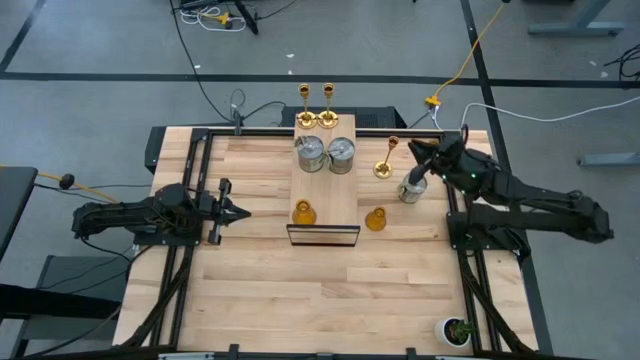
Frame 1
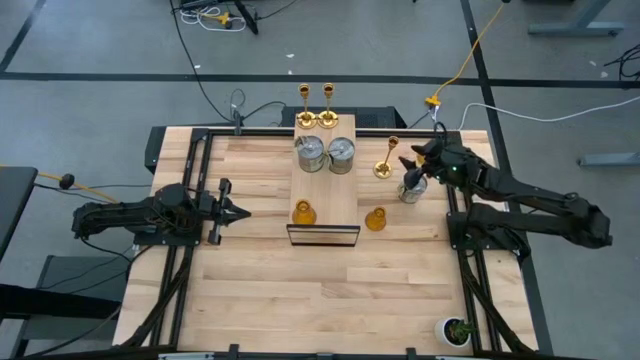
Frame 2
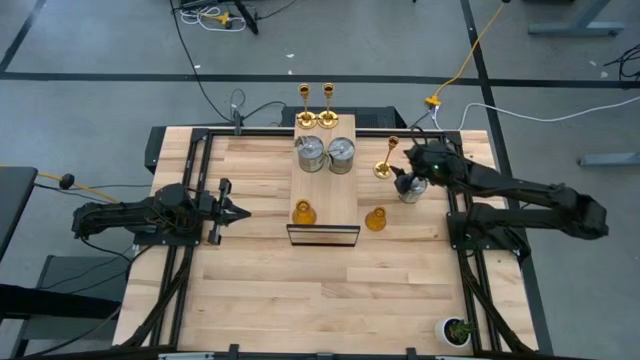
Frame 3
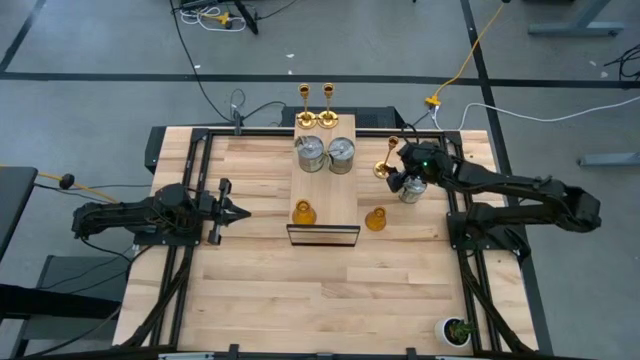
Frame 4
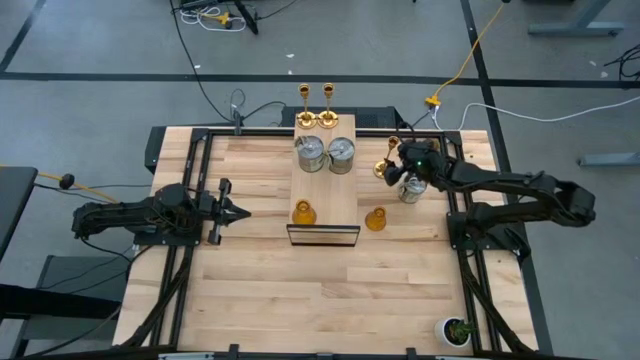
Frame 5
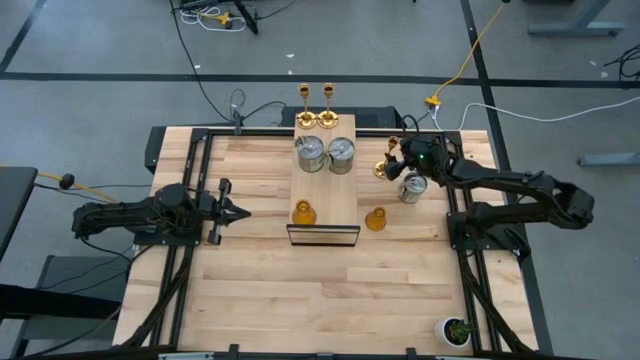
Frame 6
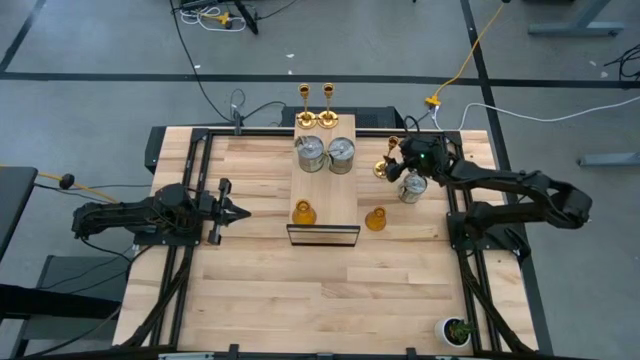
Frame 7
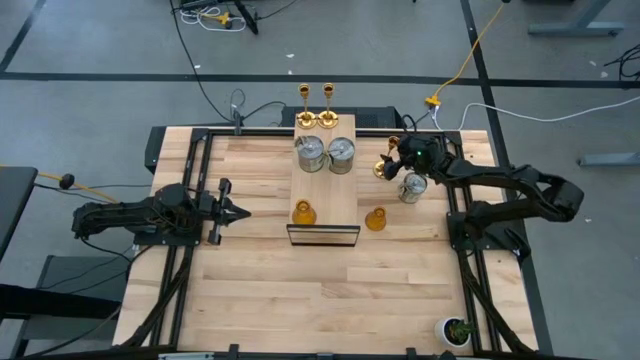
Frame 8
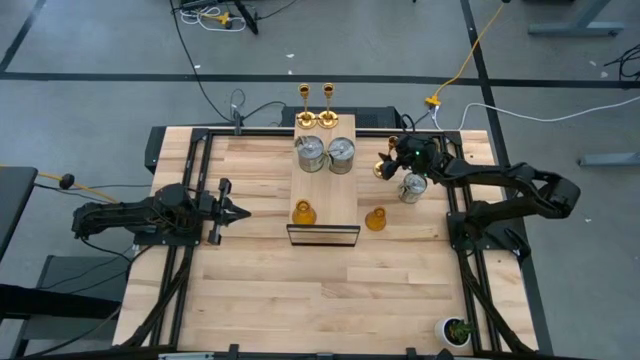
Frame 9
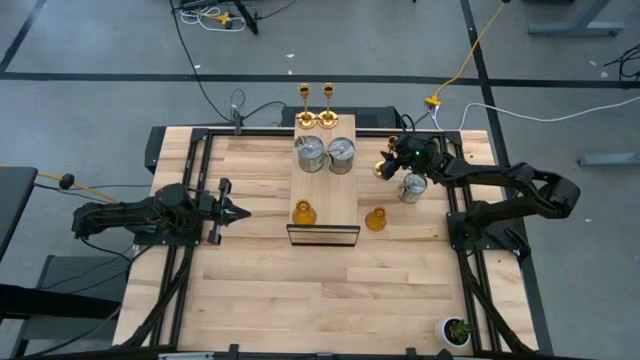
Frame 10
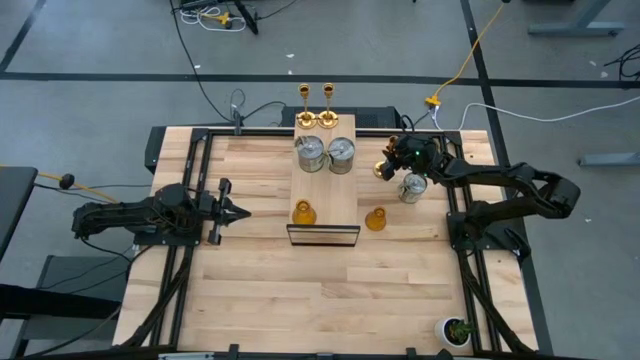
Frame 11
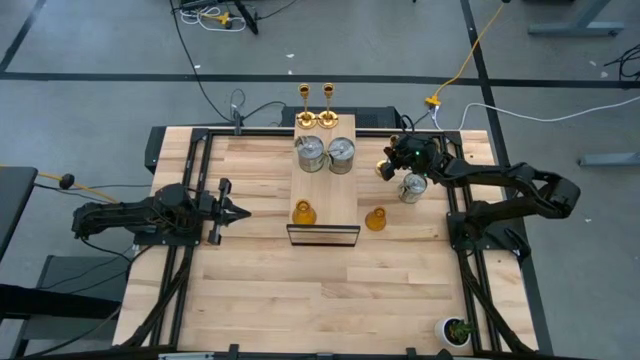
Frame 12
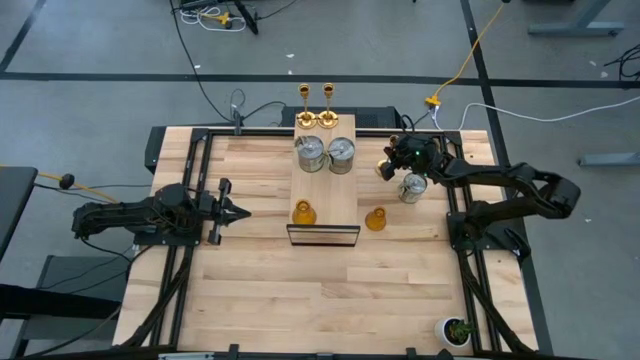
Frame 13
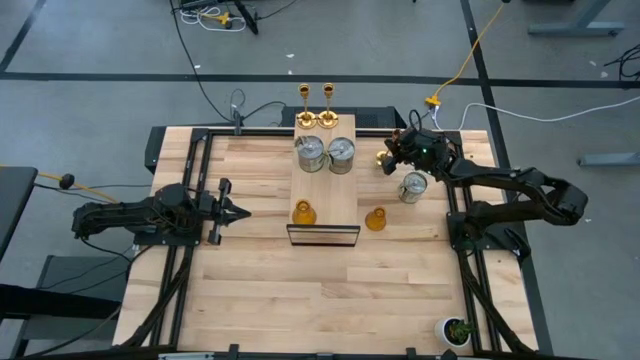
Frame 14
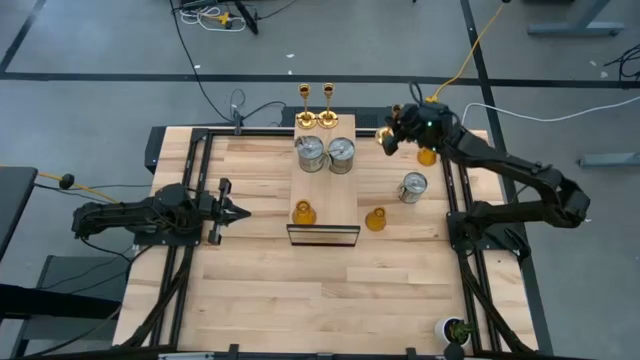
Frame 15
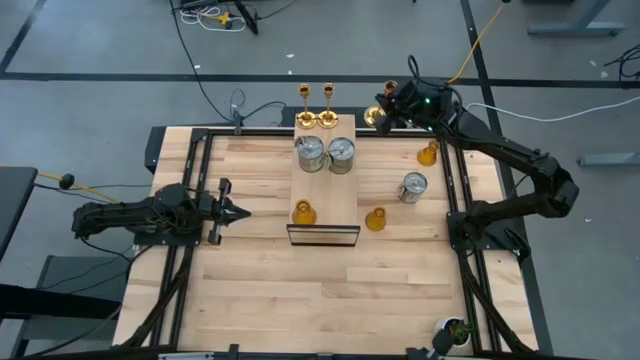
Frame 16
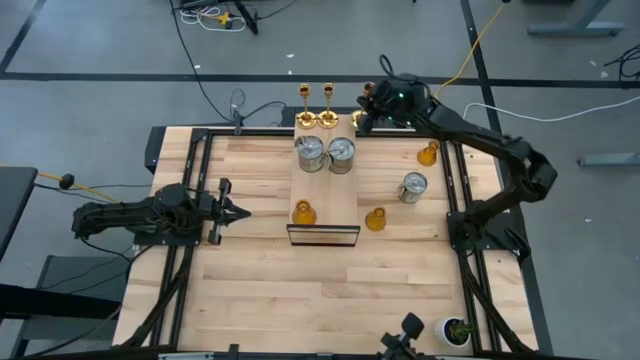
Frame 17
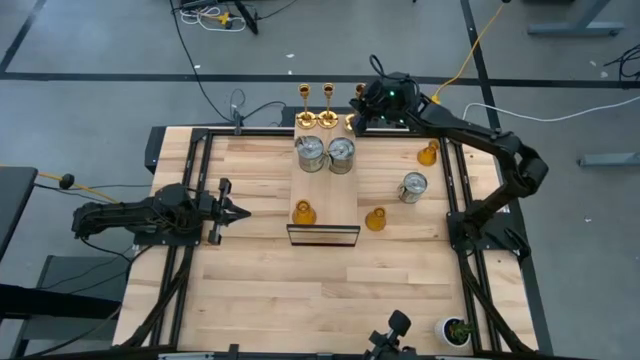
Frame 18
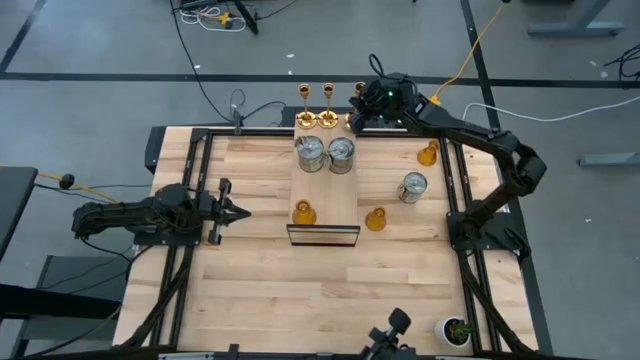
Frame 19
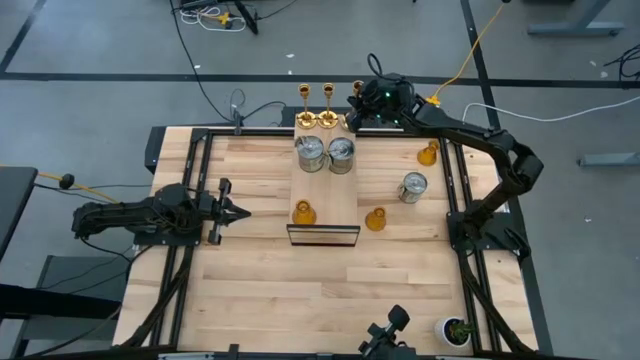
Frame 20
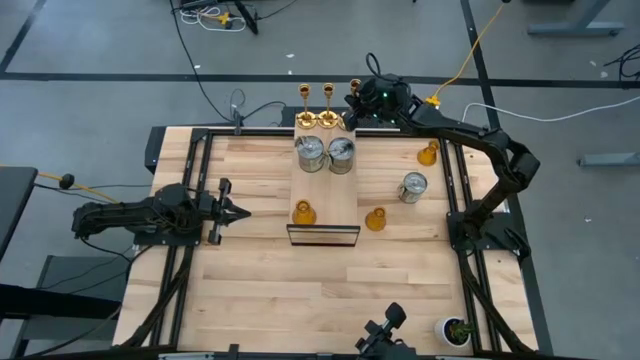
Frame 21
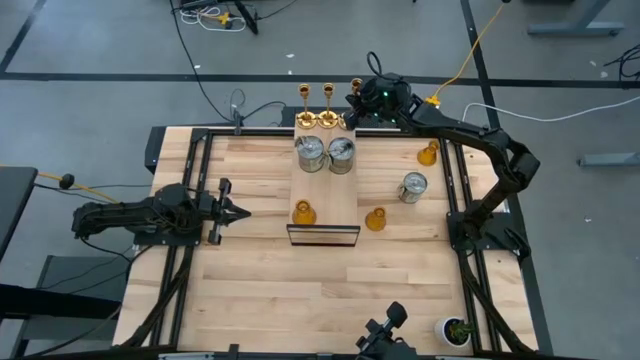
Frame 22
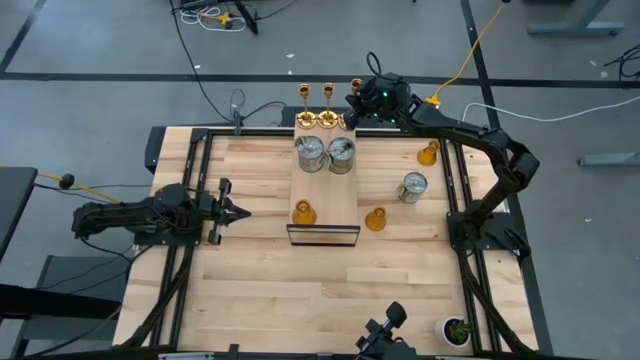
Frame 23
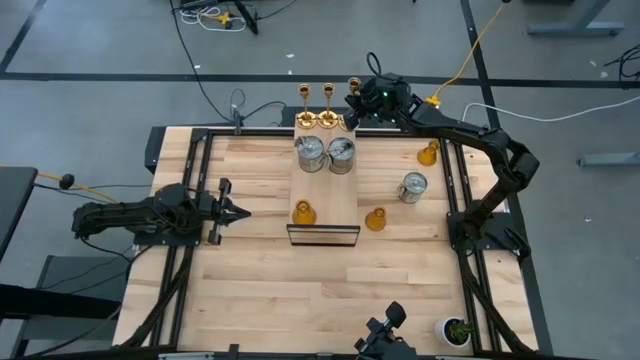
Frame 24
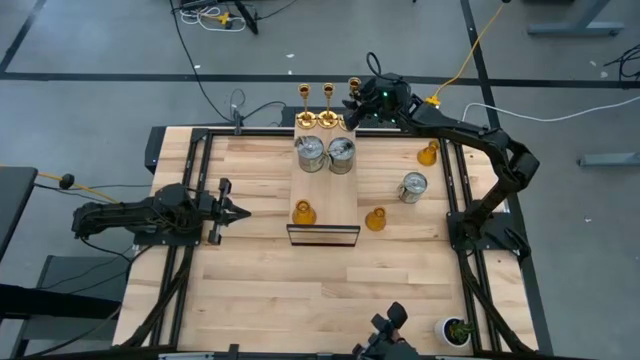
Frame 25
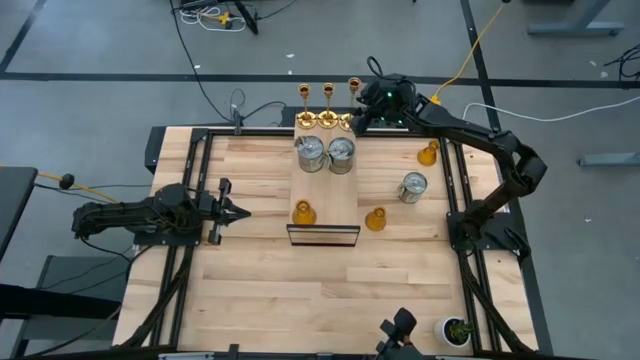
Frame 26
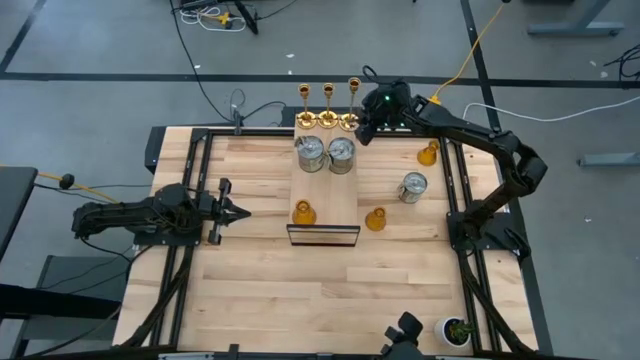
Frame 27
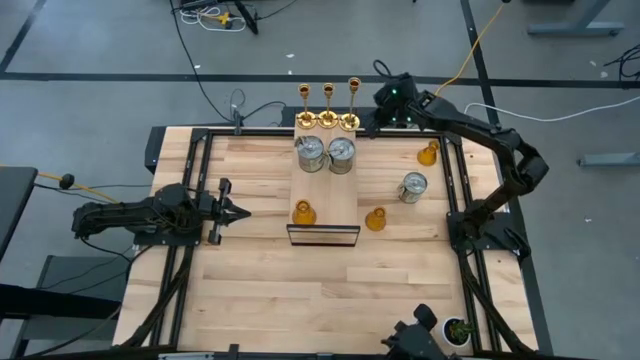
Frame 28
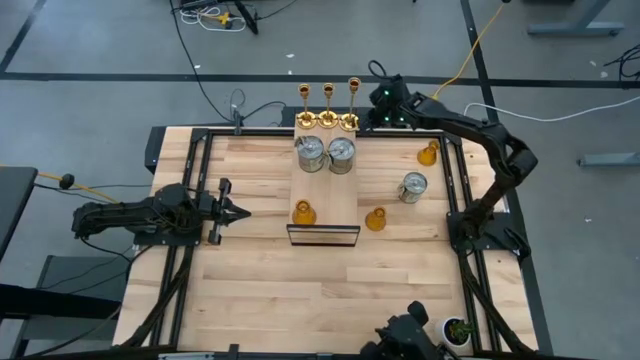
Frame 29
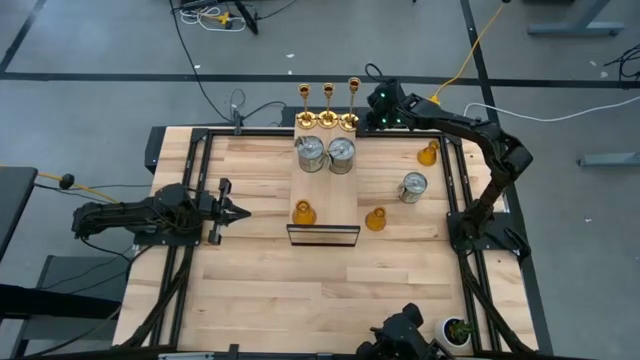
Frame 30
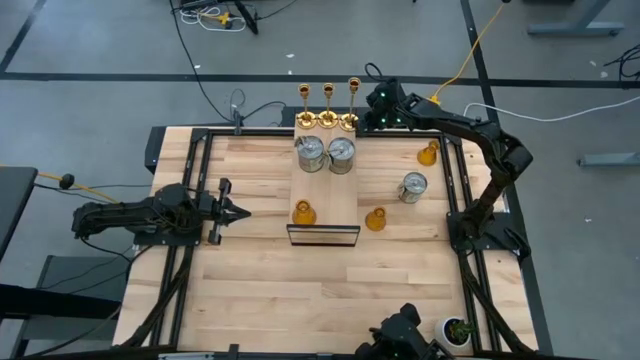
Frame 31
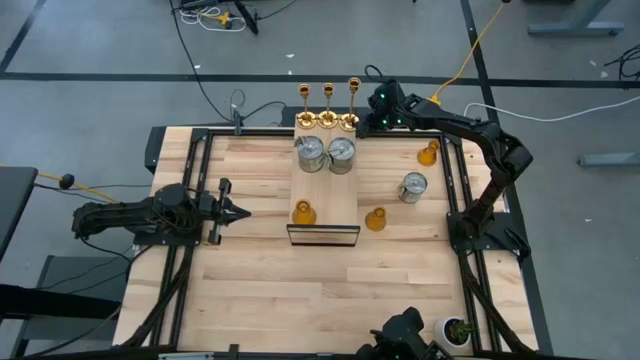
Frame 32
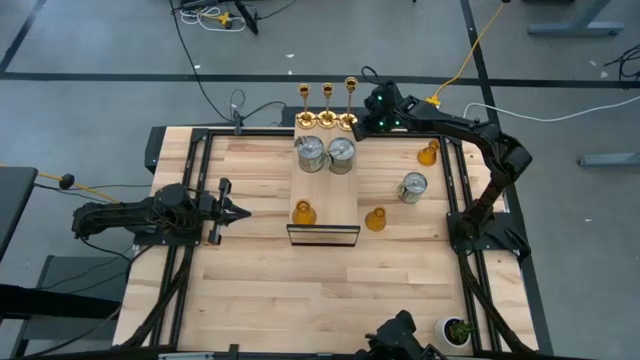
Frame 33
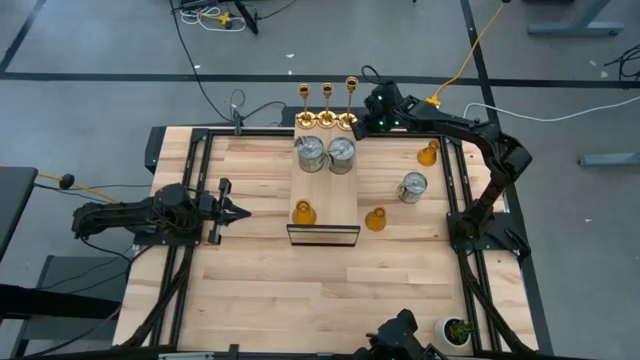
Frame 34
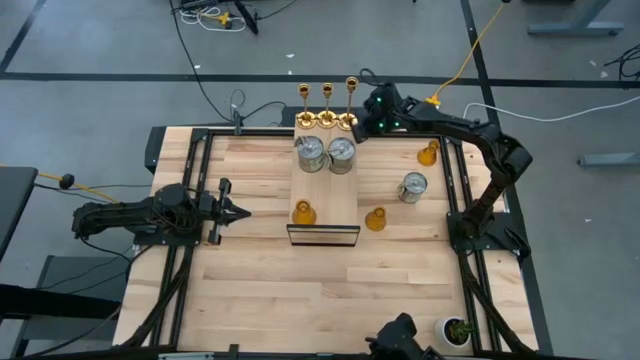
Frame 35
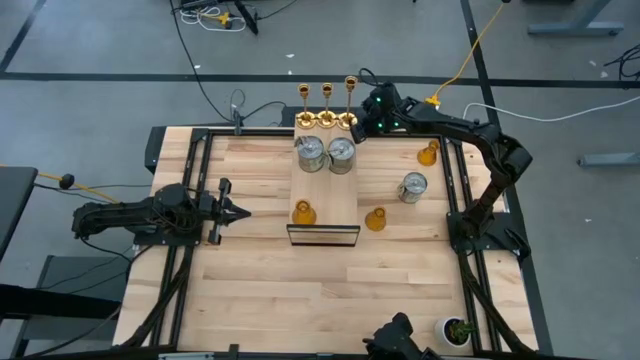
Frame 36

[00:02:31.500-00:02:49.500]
Task: Pick & Place candle stick holders
Put the gold candle holder aligned with the other candle holder on the shelf

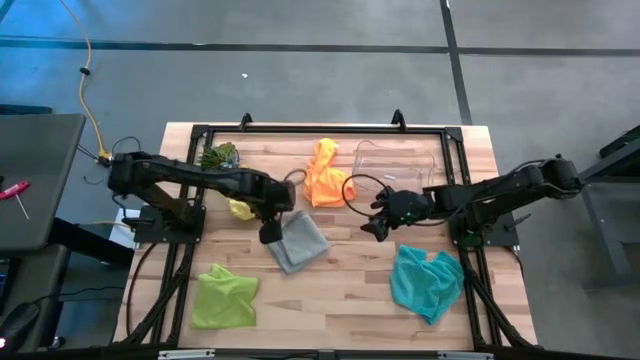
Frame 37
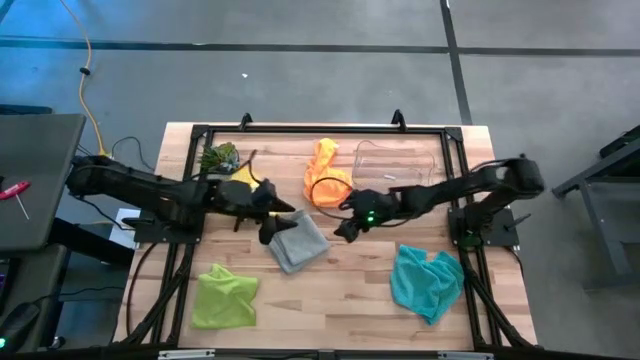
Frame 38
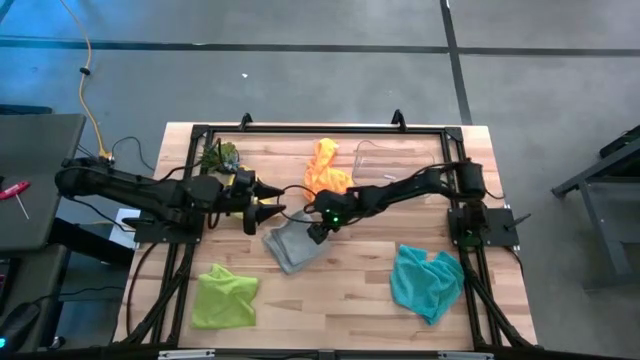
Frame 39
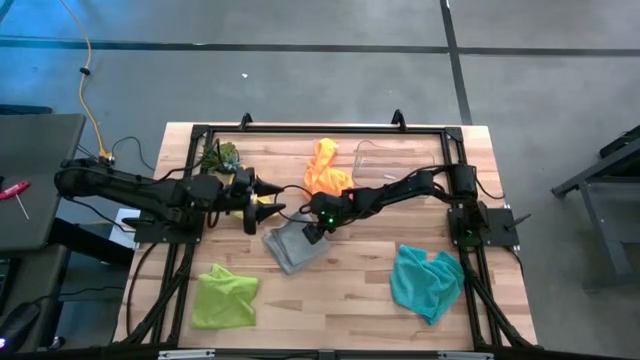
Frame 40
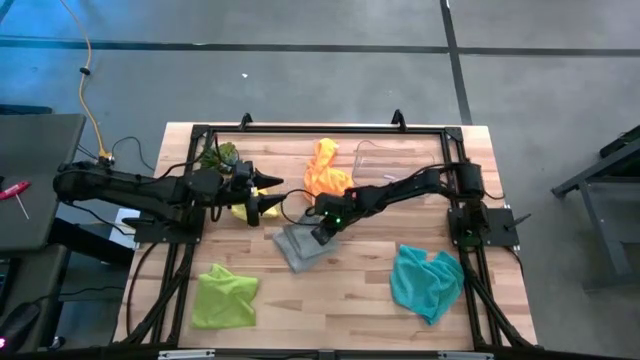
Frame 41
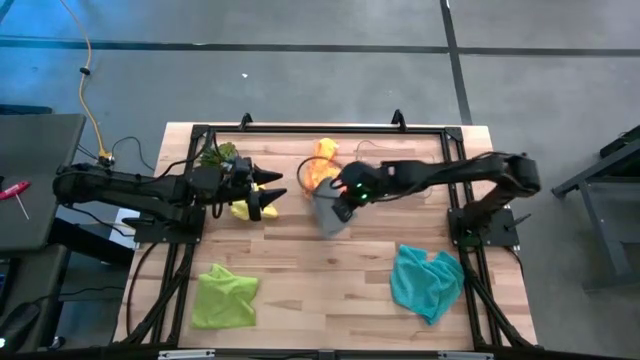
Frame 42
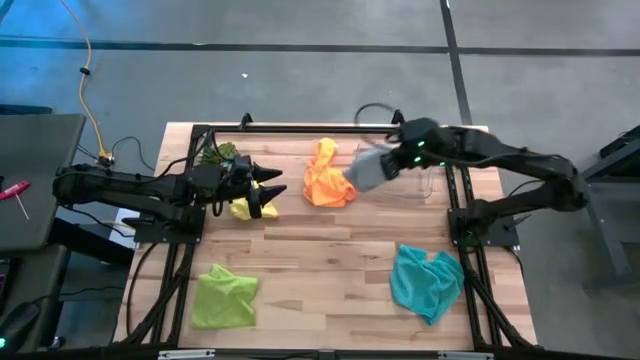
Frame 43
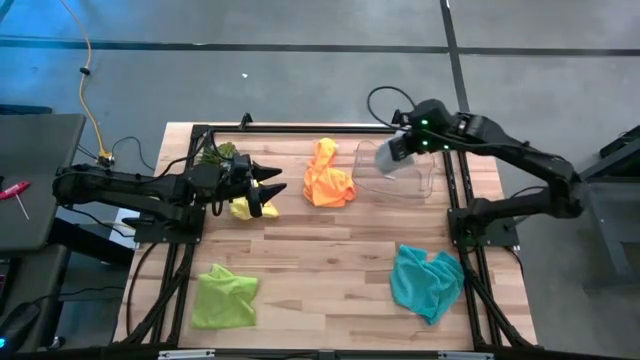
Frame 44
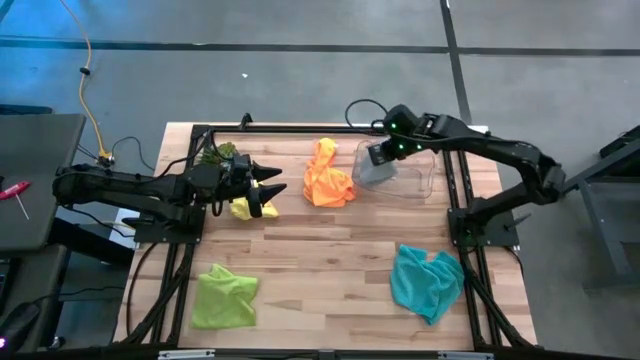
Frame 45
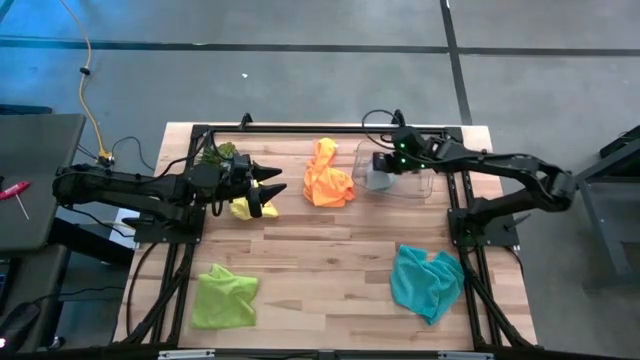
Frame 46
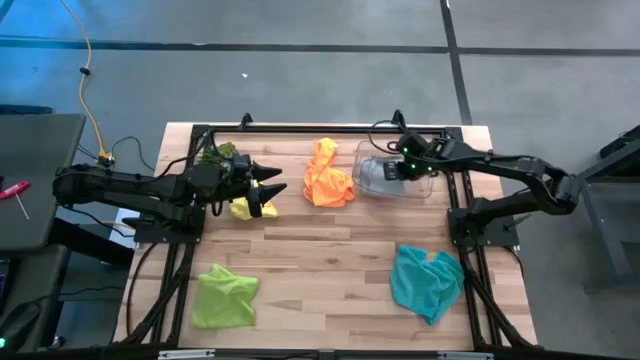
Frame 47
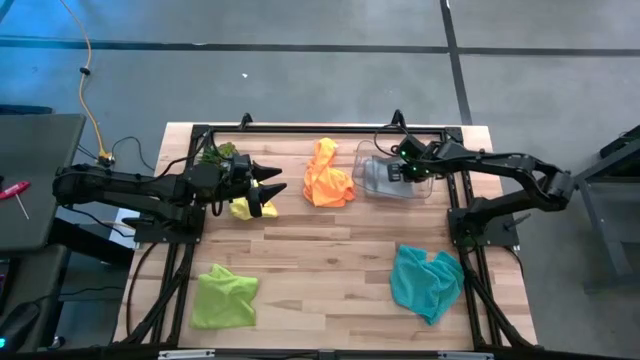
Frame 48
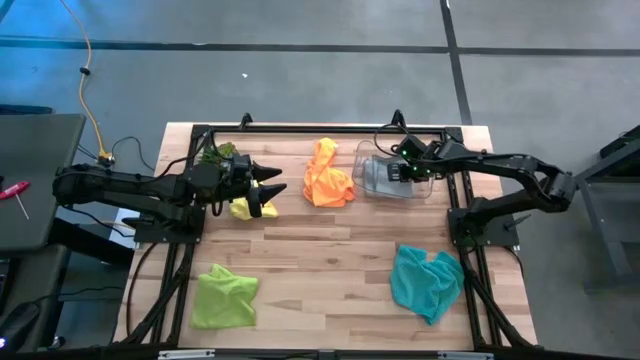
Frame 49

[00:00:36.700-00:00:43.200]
Task: Fold microfiber towels
Put the gray microfiber towel into the transparent bin
